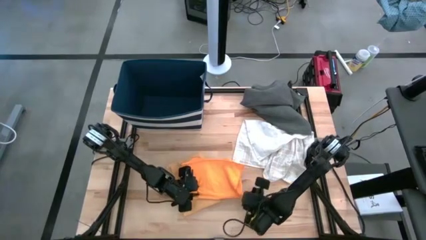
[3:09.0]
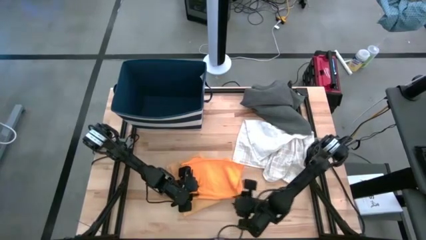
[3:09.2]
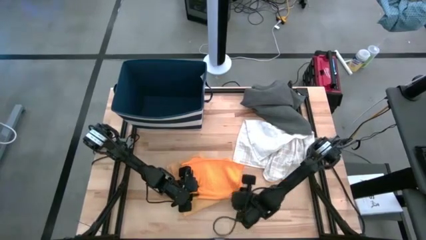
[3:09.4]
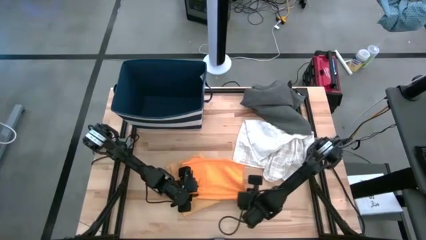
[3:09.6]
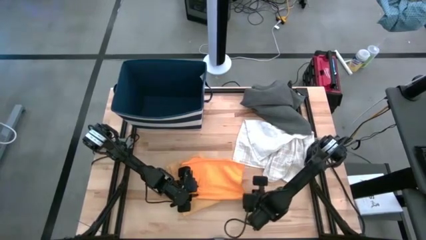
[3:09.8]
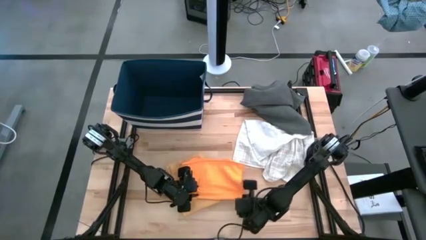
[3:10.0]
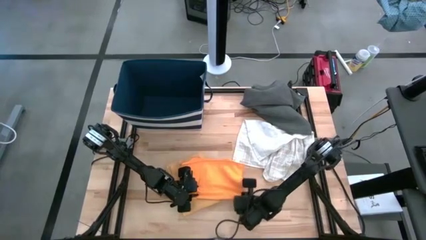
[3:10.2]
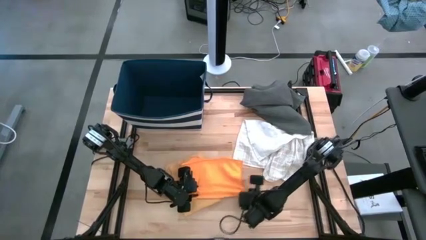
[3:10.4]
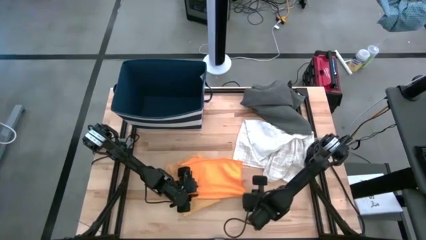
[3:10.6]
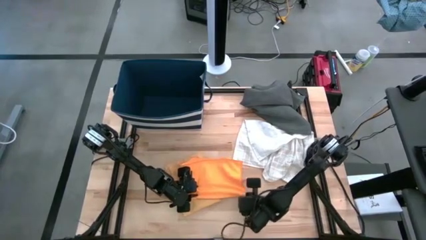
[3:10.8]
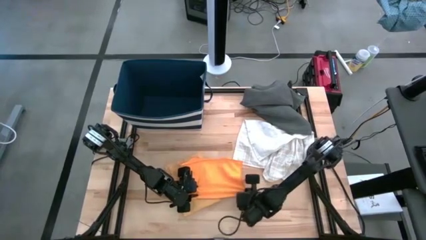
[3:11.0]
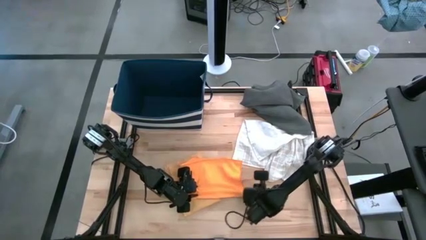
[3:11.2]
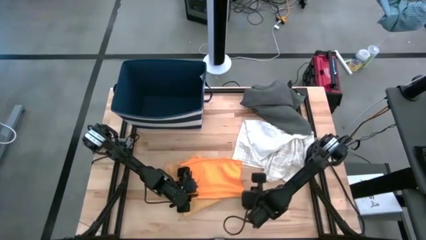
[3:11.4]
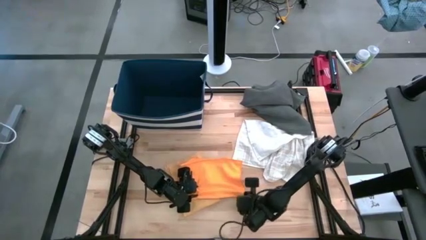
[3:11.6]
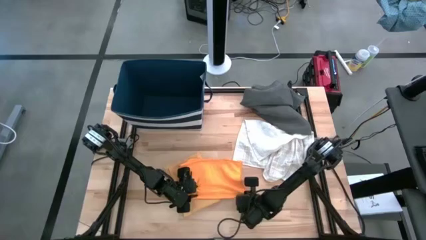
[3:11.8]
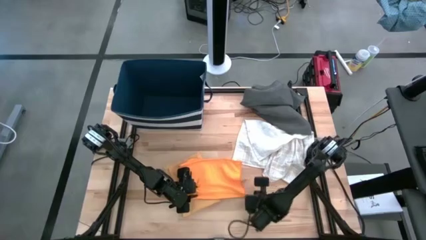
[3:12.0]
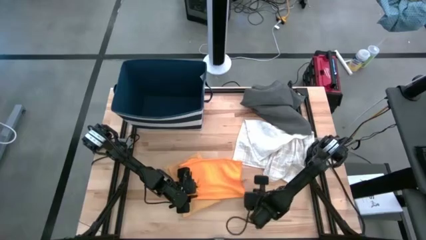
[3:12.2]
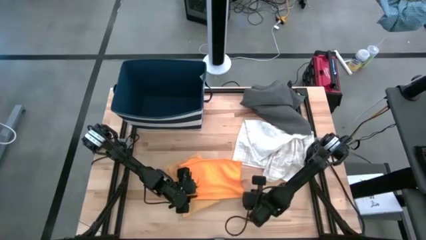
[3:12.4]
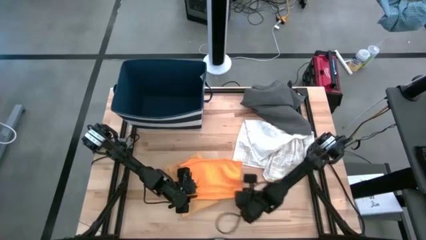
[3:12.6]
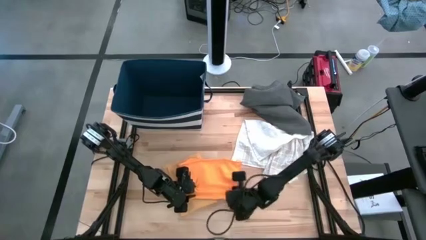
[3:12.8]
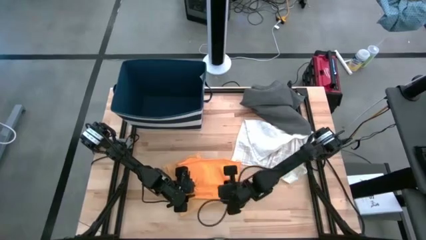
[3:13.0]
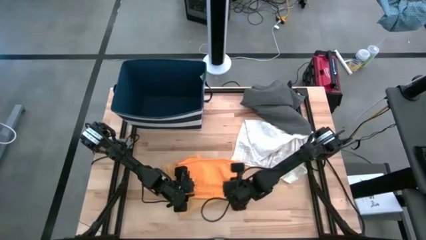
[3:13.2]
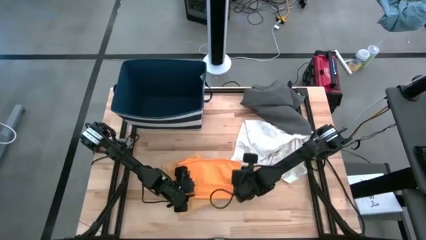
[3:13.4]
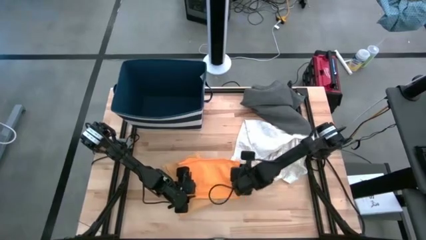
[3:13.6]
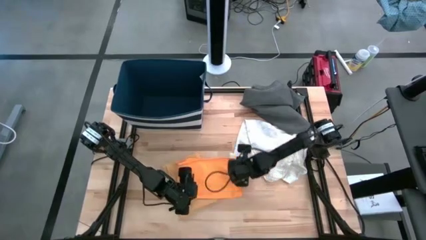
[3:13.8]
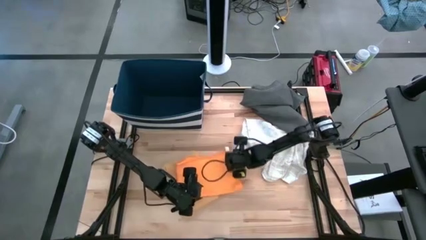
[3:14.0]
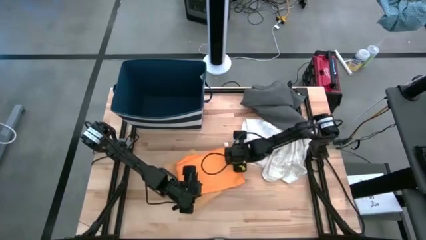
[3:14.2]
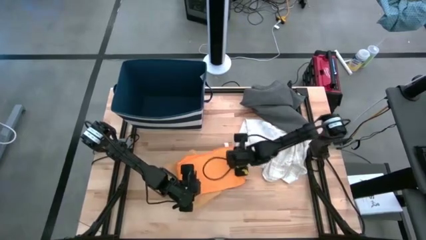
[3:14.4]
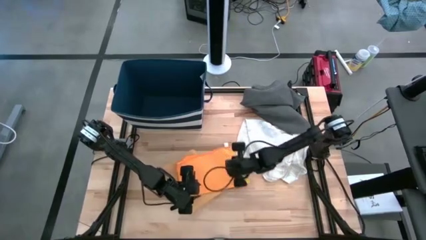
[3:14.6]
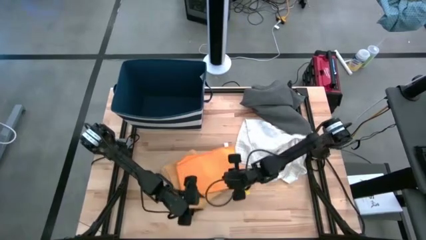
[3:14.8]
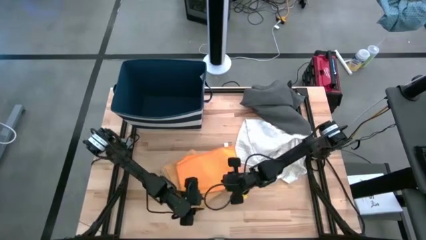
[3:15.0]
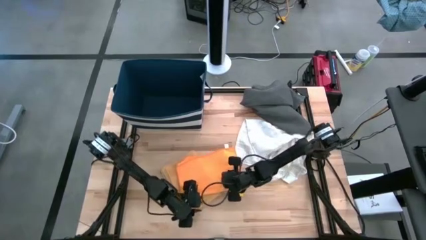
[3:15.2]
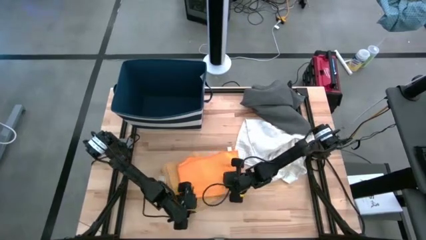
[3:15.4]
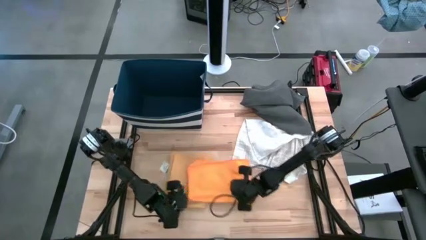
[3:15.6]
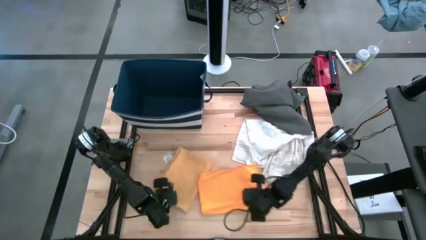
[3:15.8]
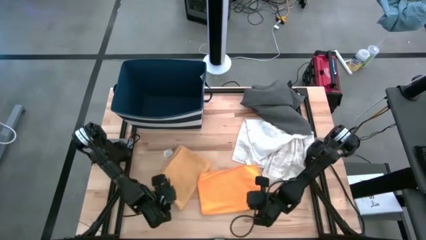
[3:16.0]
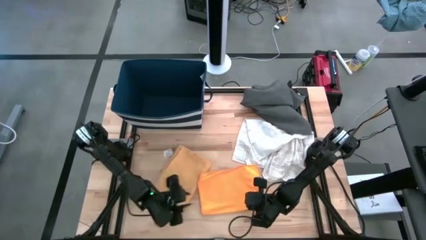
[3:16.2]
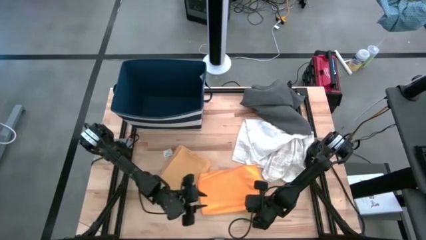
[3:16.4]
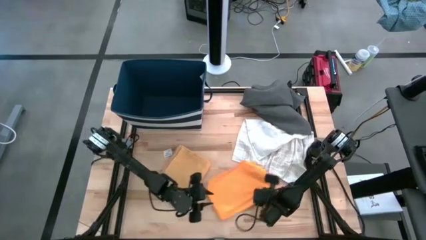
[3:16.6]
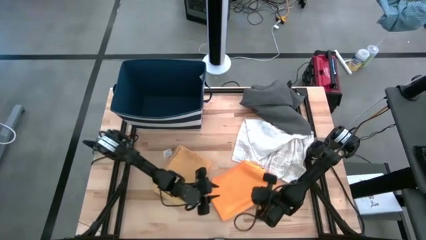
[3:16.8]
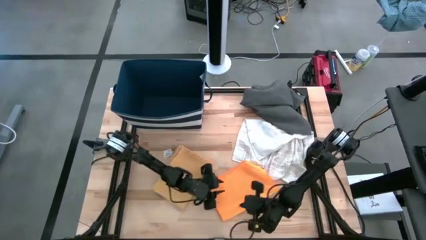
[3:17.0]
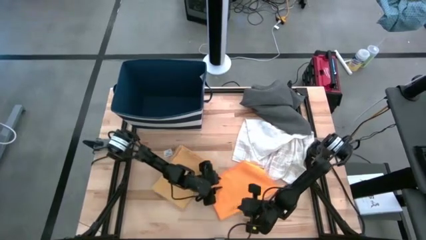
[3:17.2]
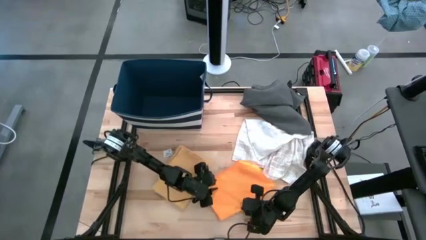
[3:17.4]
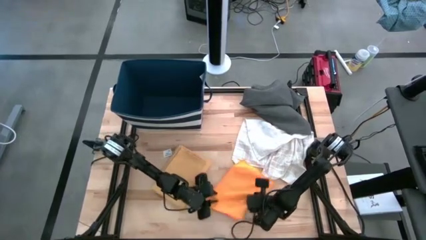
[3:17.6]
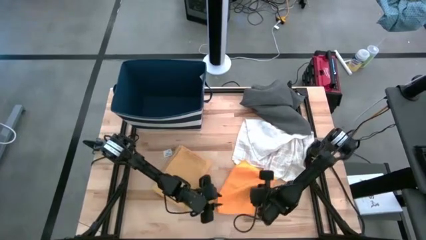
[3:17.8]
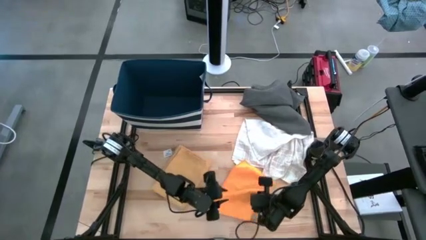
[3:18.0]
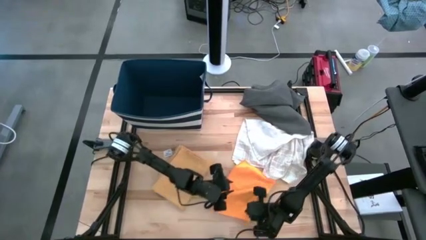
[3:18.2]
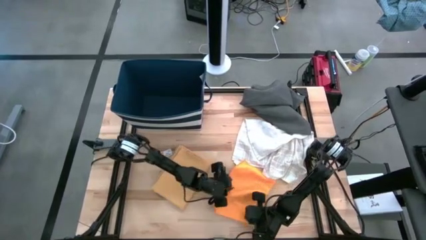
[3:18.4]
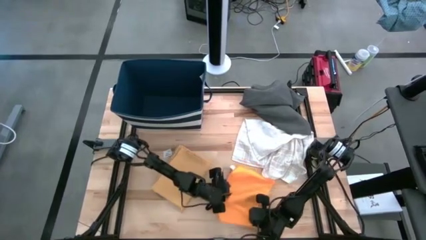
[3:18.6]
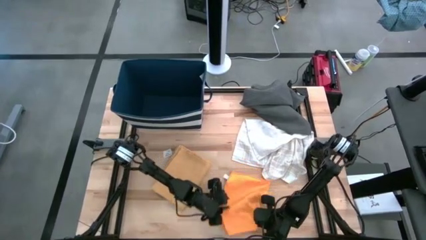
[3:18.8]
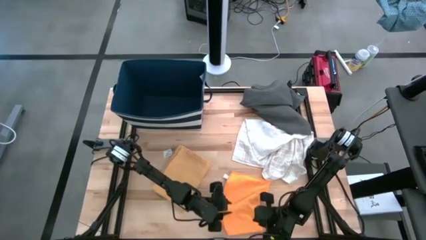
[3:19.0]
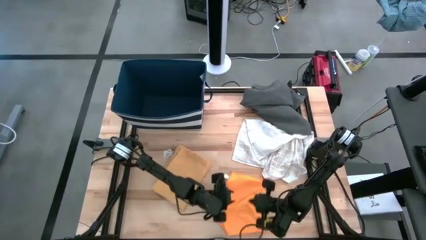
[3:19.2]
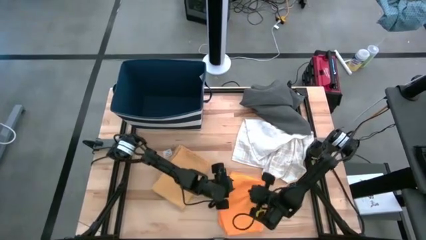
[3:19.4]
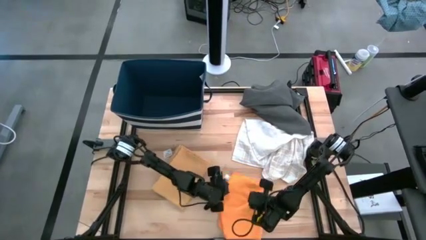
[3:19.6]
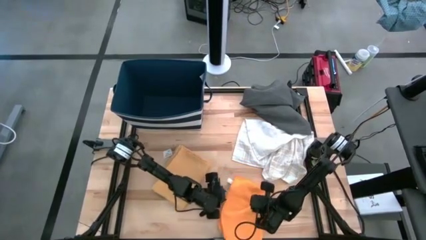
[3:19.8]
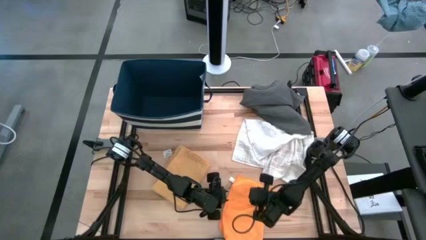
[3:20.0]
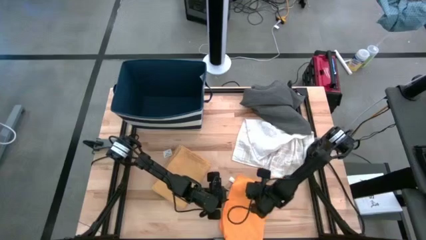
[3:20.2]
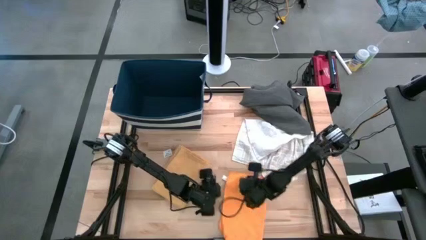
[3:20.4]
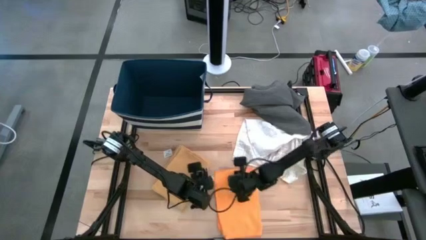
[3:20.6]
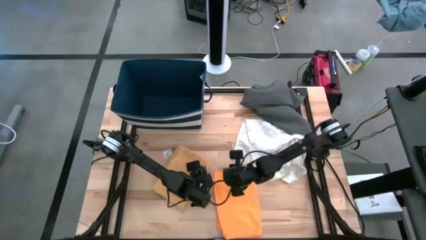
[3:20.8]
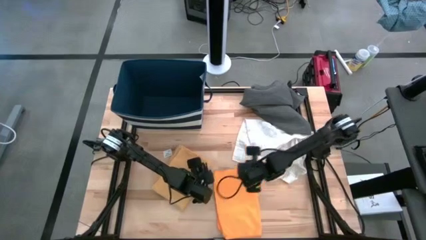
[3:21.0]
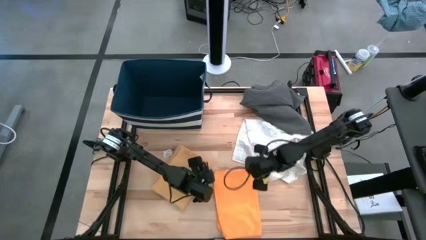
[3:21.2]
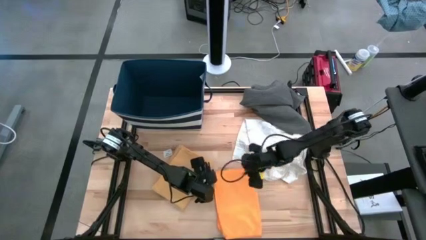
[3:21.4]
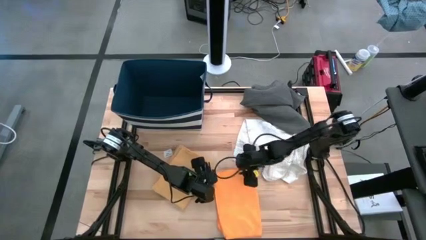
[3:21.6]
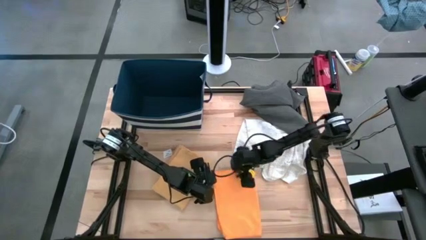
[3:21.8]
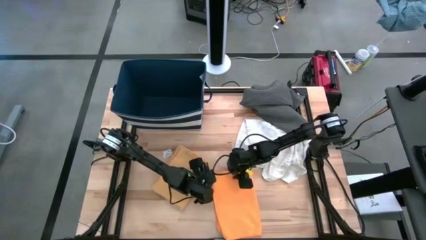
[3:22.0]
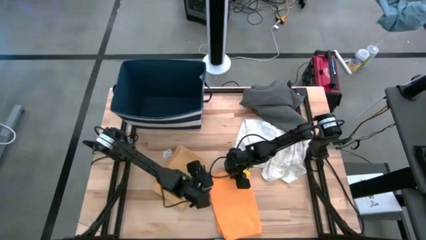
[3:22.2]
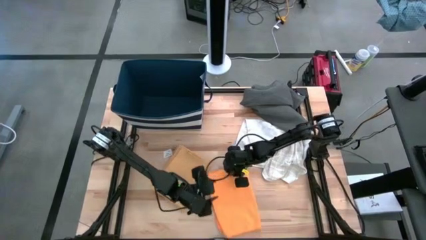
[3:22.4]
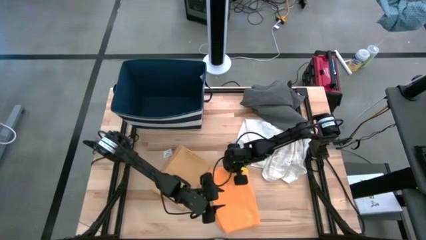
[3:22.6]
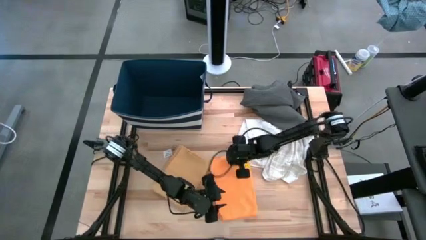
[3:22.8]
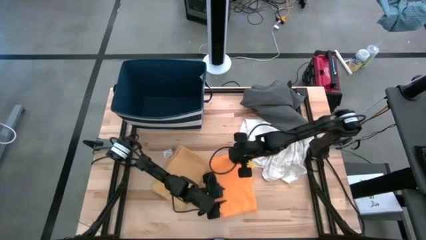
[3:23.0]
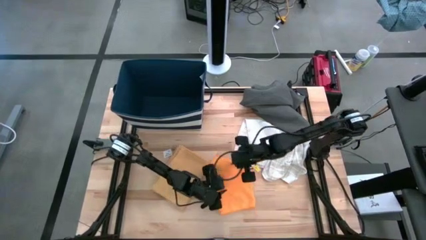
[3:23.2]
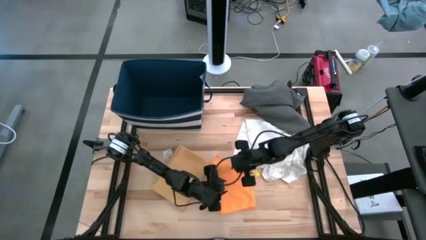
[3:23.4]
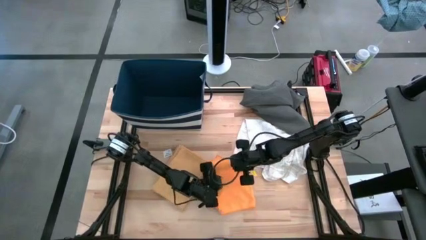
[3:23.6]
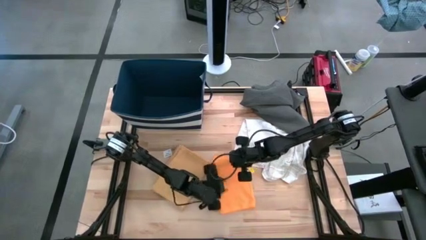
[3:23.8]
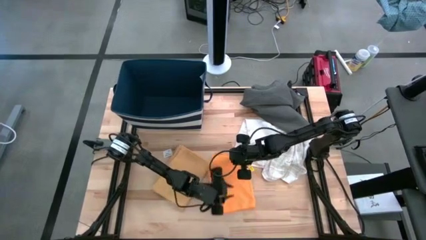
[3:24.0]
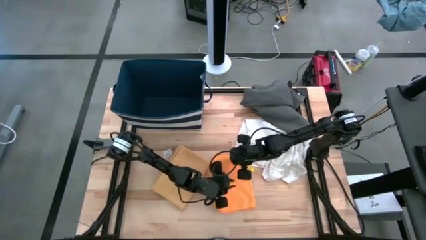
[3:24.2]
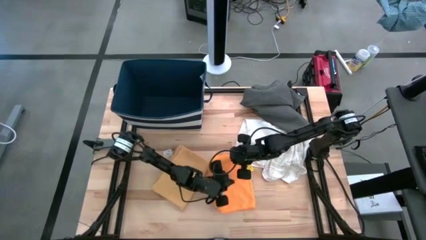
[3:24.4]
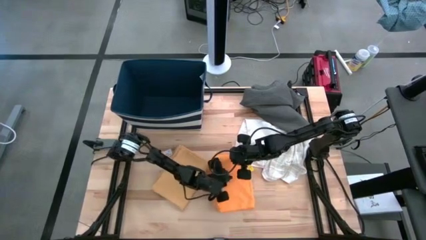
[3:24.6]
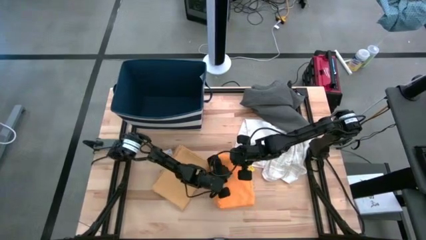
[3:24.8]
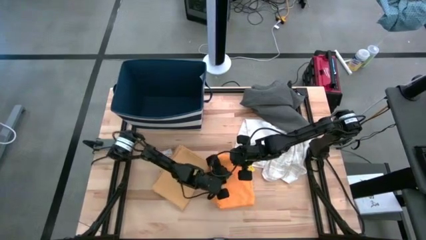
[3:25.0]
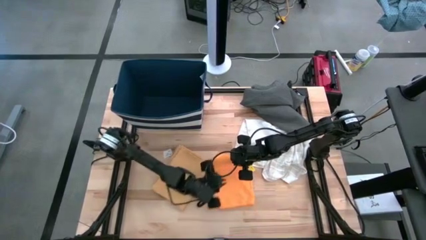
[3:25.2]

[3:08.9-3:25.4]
Task: Fold towel
Fold the orange kitchen towel

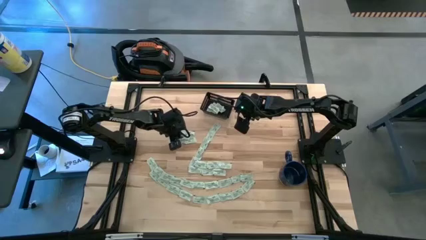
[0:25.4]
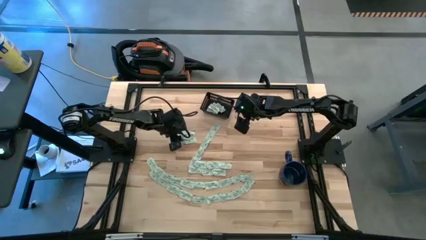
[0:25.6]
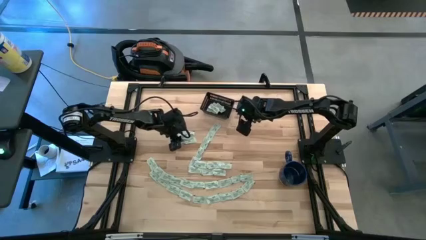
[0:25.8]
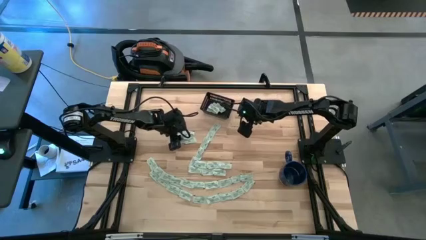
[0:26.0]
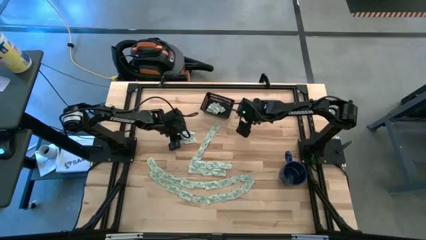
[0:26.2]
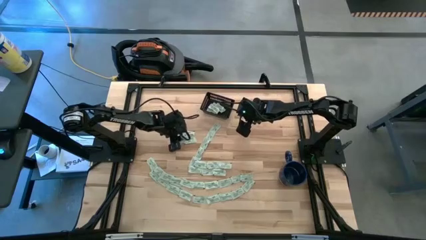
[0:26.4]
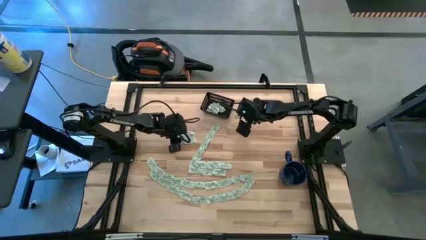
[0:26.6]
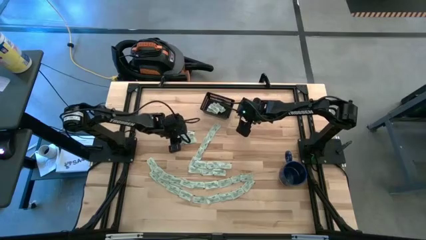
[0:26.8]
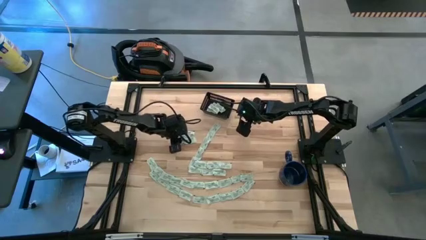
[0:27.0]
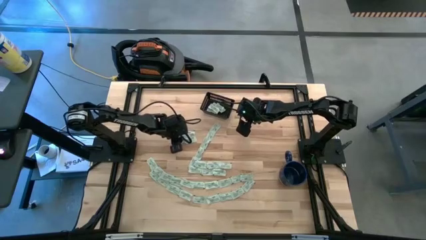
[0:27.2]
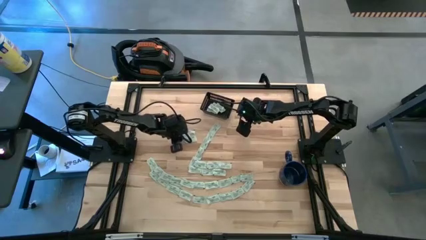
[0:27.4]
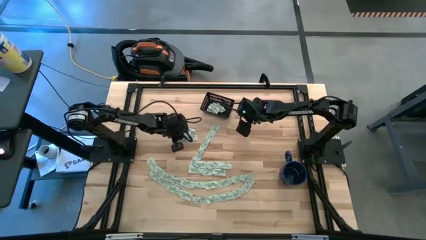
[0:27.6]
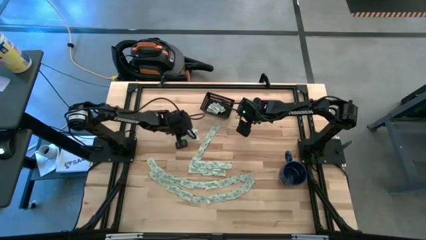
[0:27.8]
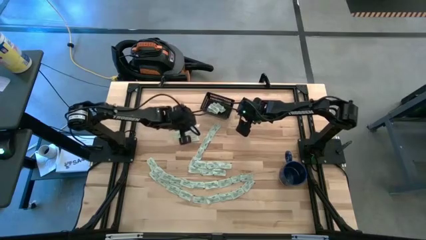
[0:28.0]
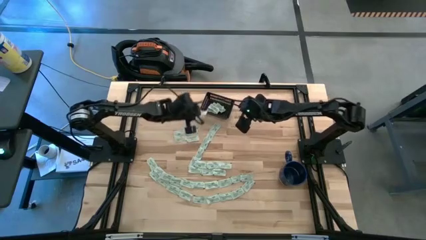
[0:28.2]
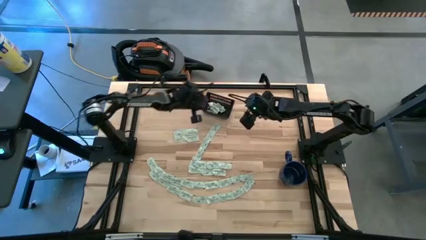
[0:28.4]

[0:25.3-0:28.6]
Task: Pick and place Stevia / Truvia into bins
Put the stevia packet into the black bin
